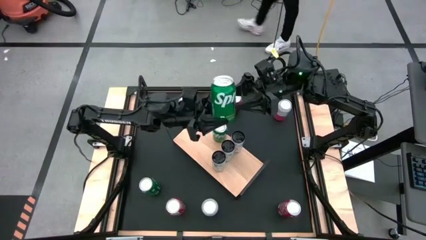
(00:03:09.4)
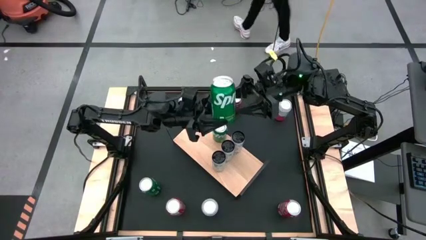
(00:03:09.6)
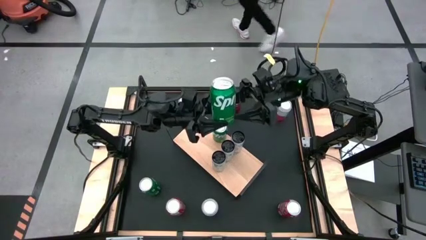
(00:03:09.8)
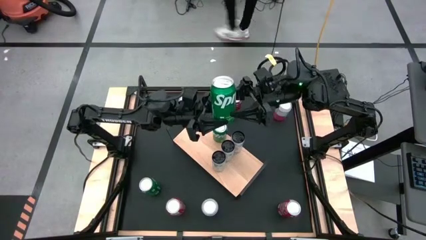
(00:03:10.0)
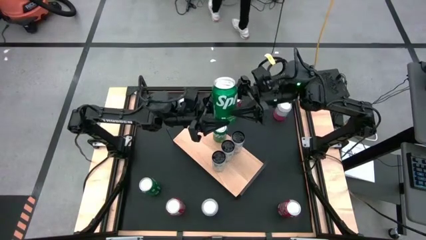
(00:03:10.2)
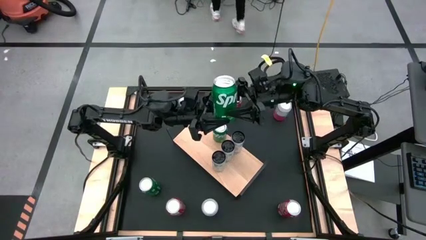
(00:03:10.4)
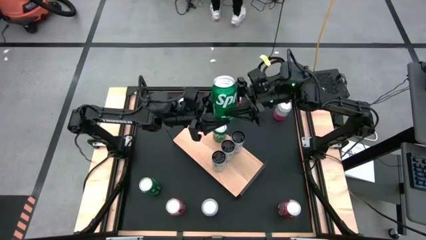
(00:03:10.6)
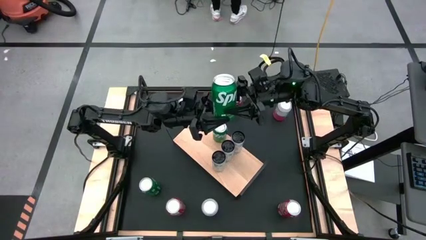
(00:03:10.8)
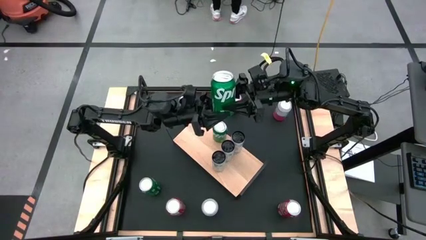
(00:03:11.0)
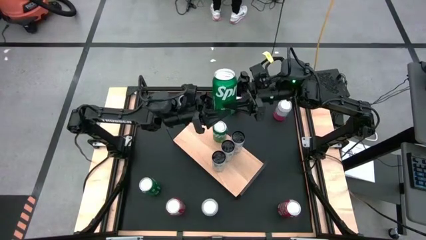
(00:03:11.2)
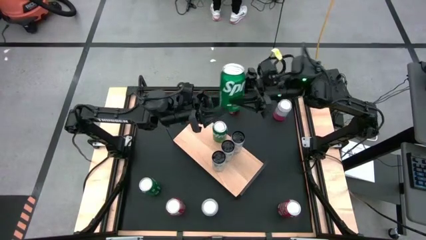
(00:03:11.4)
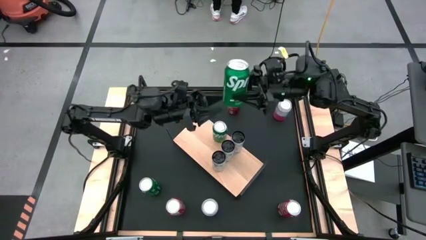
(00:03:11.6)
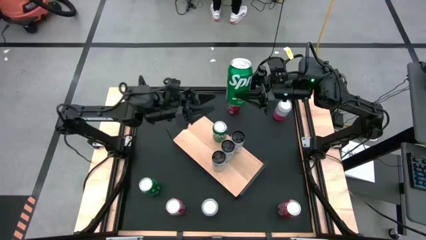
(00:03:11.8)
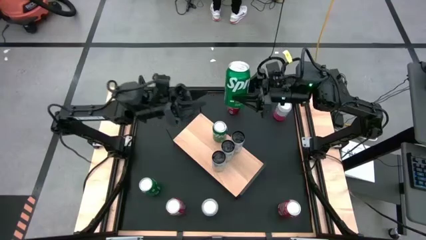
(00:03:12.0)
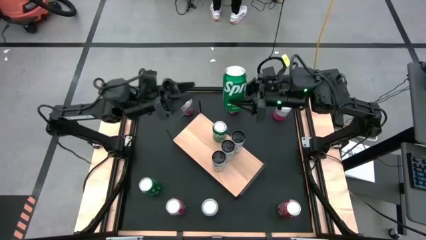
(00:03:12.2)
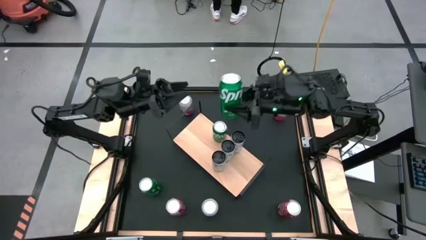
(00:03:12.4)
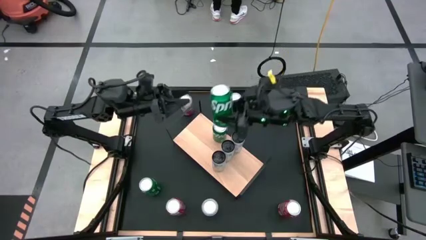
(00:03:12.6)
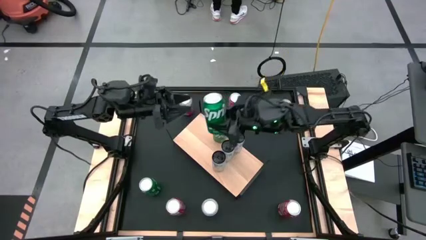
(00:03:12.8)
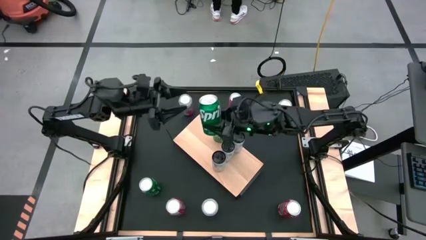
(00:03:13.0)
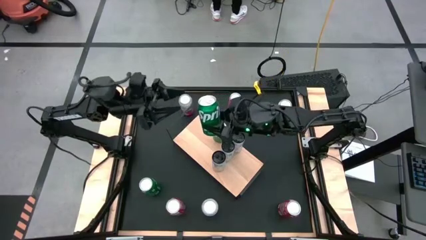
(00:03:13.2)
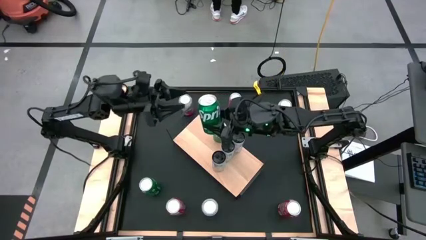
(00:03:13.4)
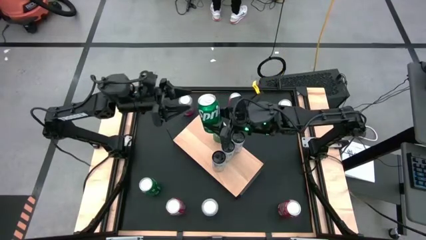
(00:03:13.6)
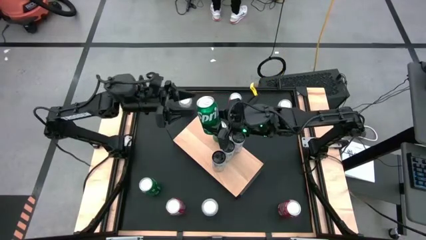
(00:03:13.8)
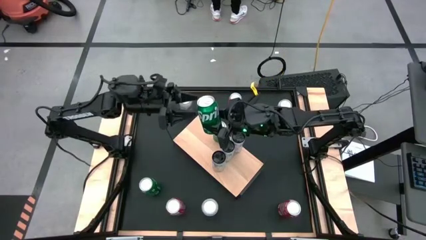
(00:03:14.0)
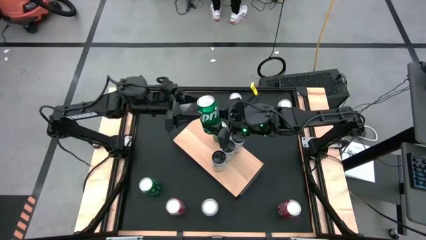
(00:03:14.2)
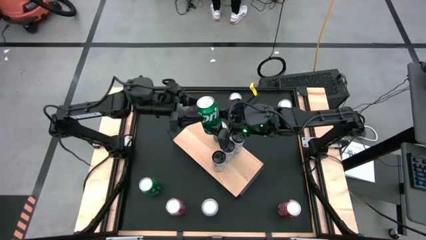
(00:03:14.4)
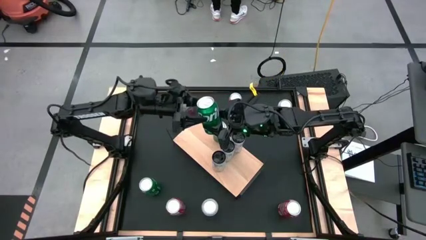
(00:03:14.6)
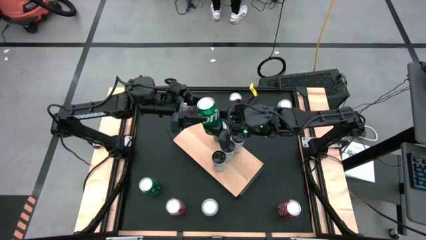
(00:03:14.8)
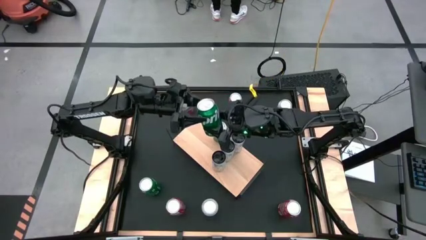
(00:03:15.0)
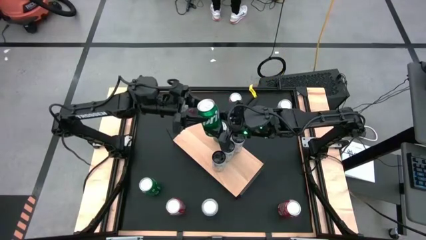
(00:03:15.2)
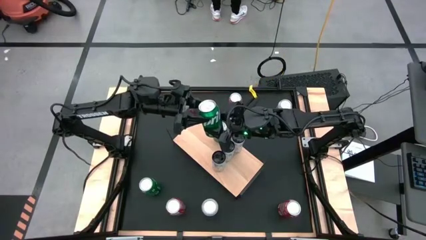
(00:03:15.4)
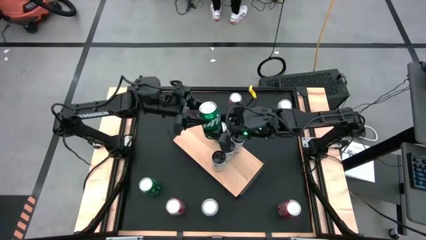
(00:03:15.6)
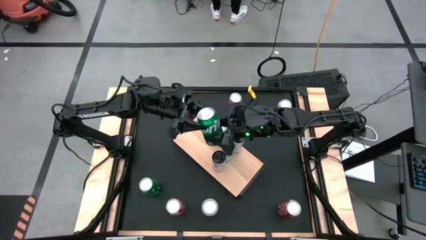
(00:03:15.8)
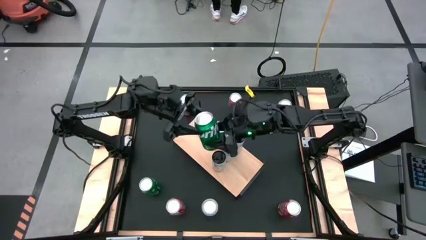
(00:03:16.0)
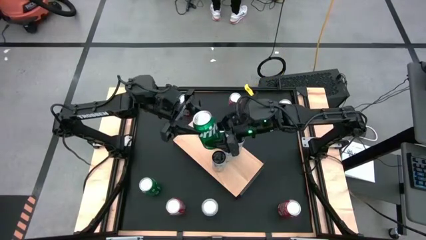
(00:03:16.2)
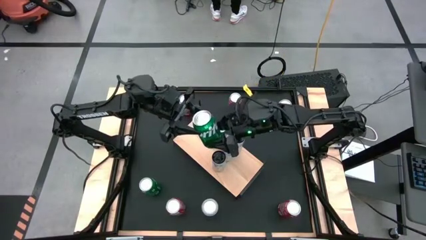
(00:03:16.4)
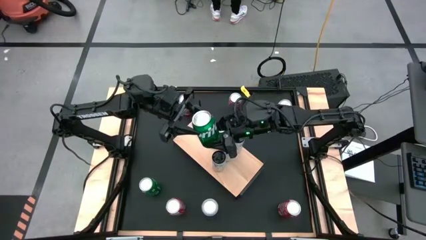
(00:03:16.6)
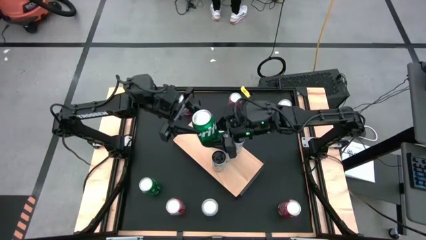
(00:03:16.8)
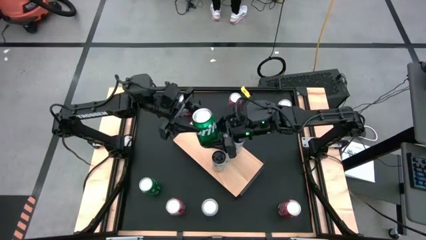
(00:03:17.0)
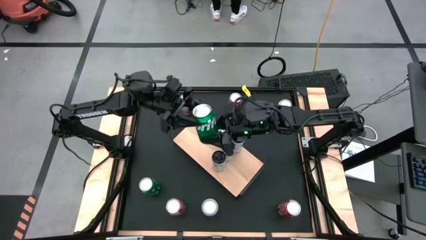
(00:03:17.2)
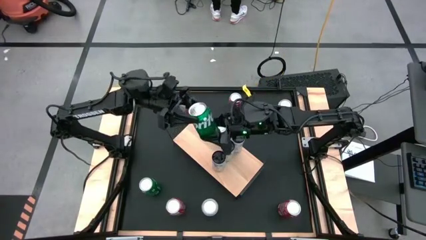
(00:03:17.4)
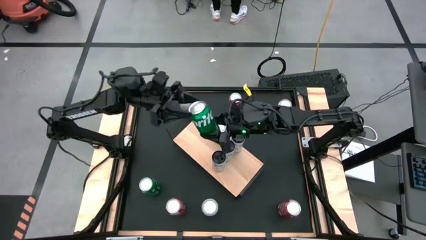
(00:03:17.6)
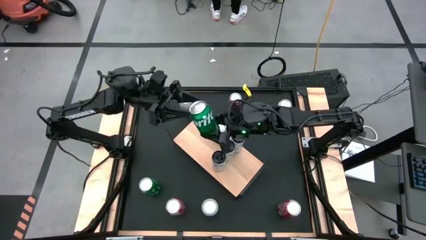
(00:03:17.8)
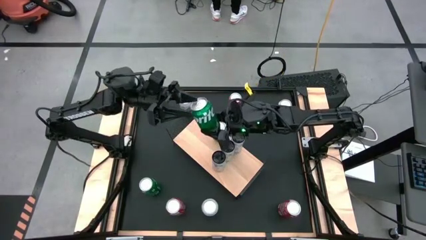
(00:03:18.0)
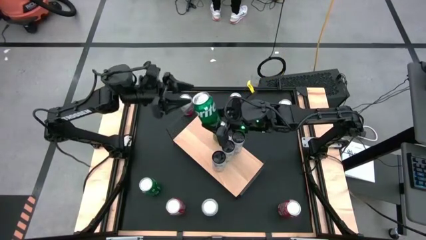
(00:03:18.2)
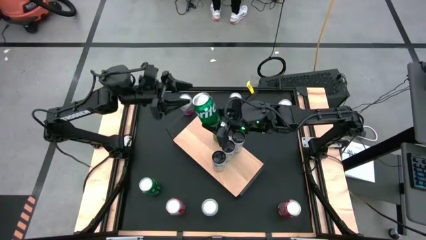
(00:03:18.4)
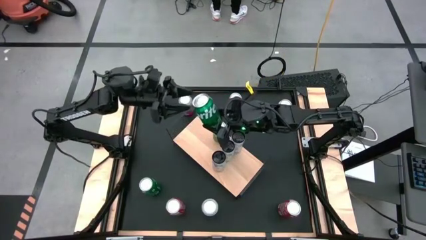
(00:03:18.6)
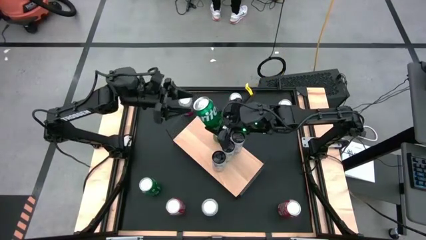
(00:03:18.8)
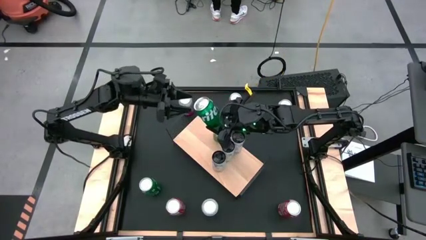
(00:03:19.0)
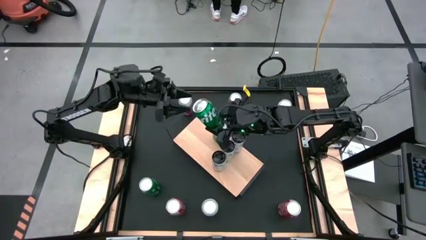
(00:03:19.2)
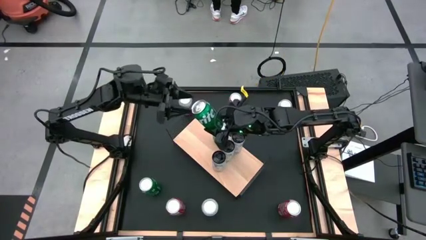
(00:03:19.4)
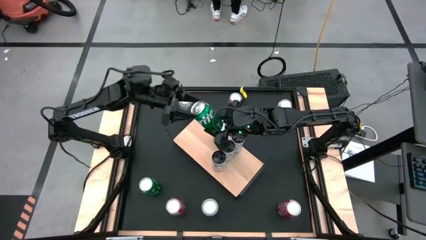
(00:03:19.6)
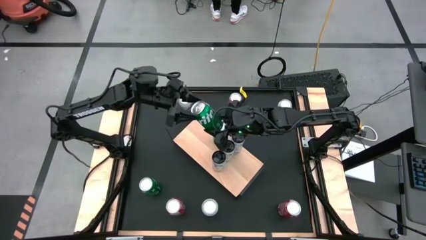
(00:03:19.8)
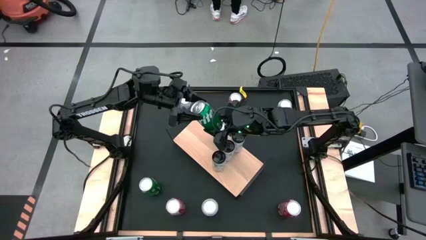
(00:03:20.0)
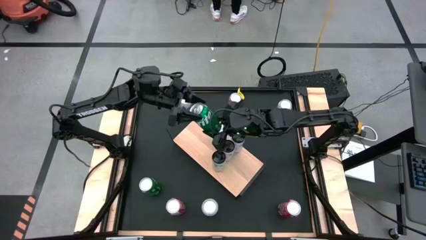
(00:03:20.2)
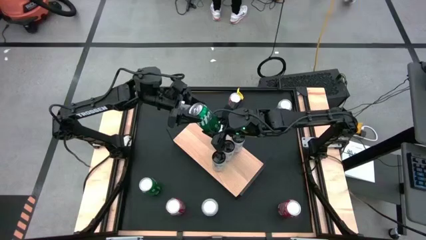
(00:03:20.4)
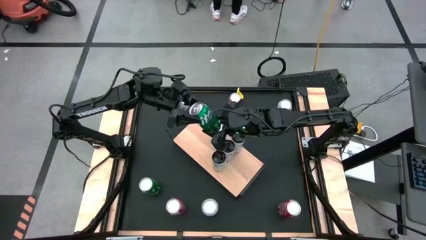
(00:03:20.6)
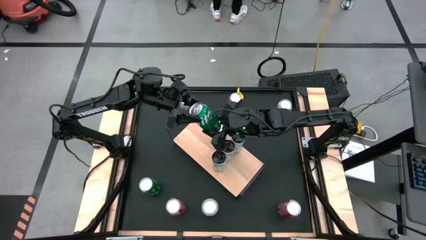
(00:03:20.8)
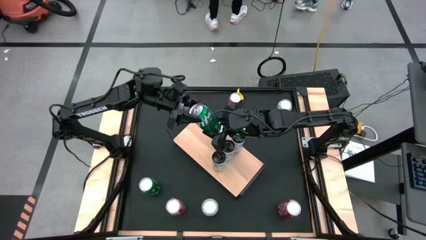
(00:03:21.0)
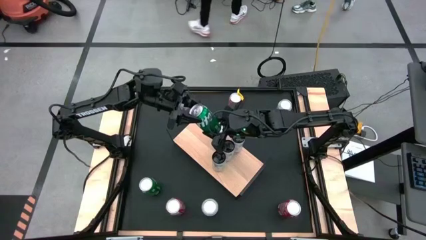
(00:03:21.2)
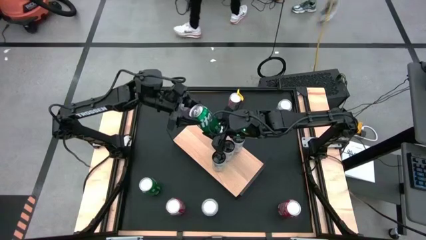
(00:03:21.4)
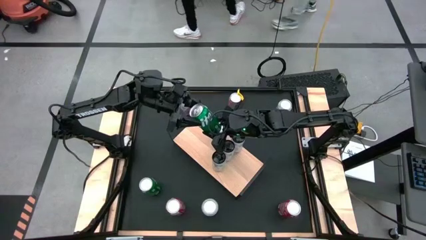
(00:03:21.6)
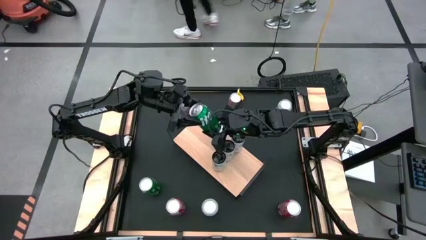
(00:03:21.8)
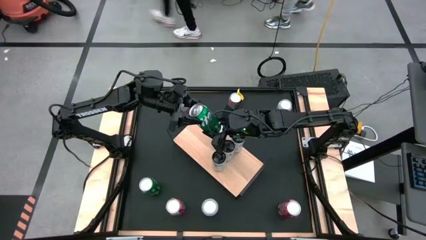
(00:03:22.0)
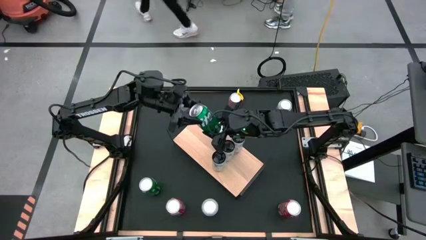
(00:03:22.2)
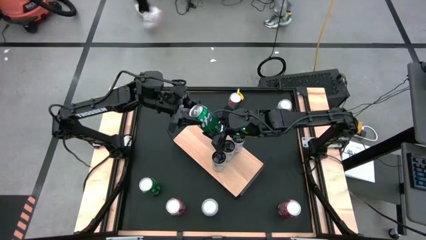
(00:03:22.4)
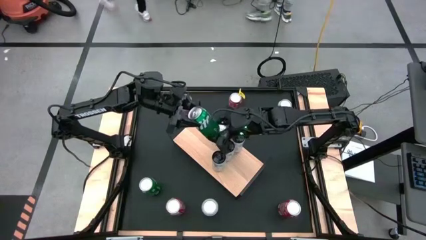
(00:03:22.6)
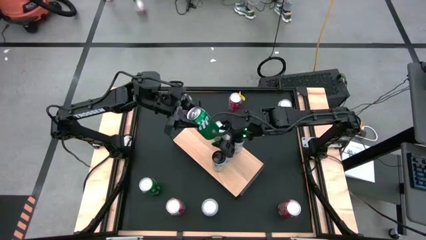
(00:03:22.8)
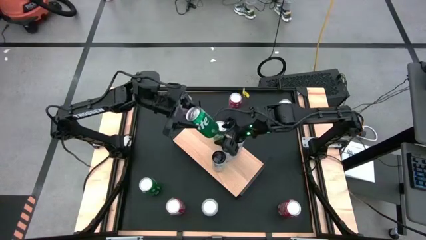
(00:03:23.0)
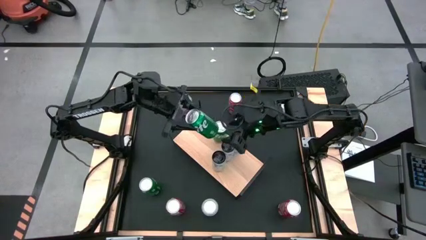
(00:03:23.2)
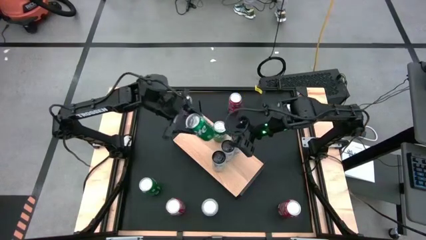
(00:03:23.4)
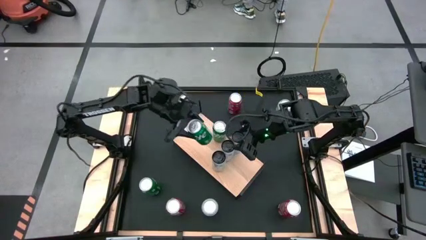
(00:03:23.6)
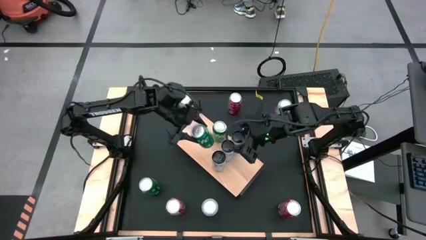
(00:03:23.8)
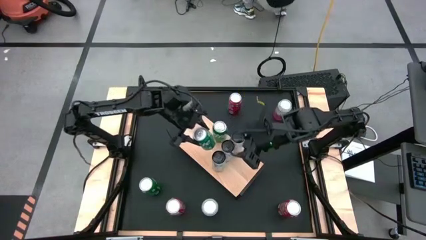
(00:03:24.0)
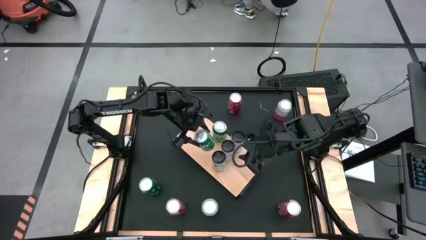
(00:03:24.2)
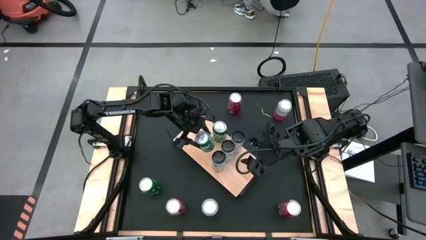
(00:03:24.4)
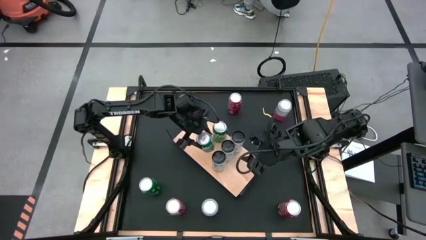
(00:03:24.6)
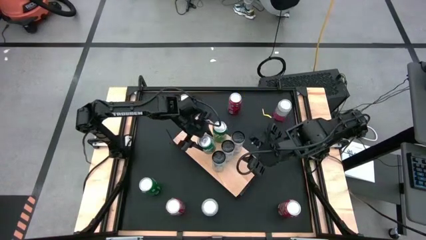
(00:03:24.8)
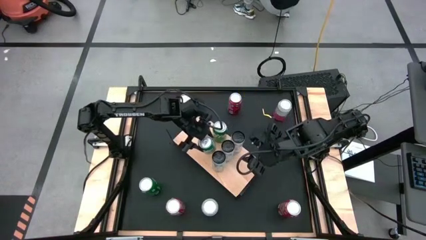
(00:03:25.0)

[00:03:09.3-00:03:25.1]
Task: Place canned beverage on shelf
Put the top green soda can aligned with the other top green soda can
